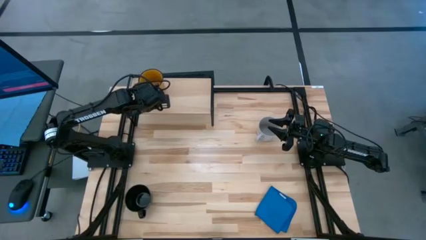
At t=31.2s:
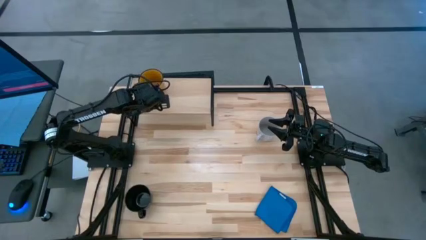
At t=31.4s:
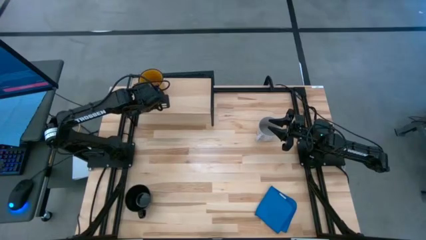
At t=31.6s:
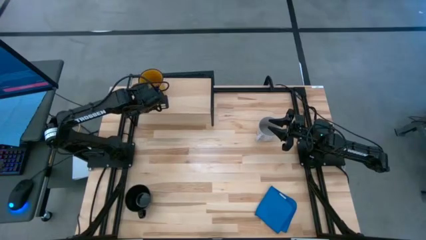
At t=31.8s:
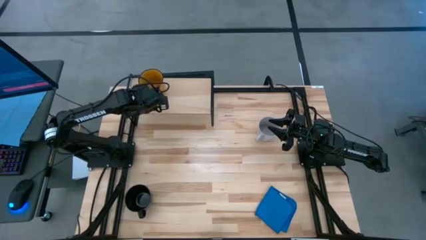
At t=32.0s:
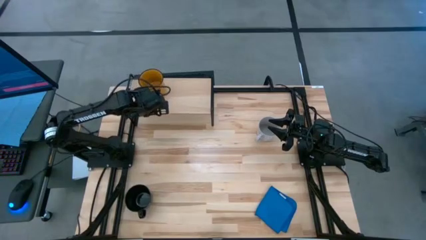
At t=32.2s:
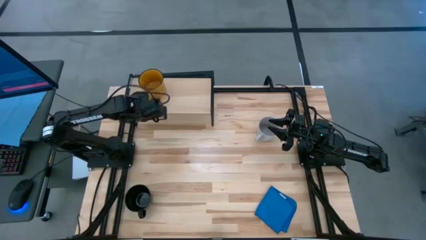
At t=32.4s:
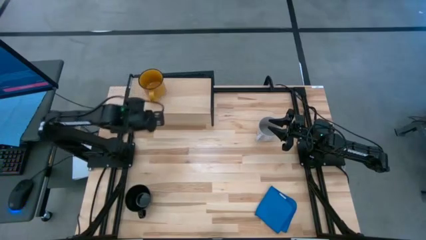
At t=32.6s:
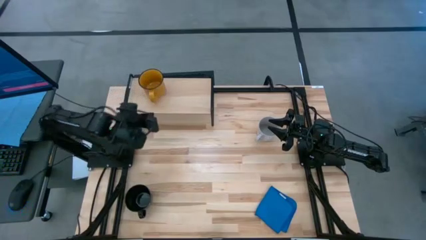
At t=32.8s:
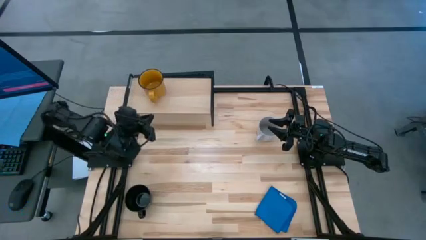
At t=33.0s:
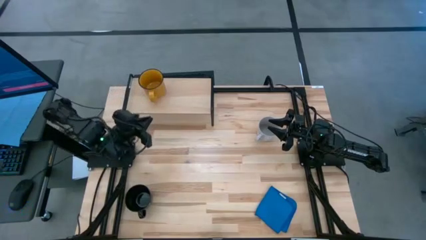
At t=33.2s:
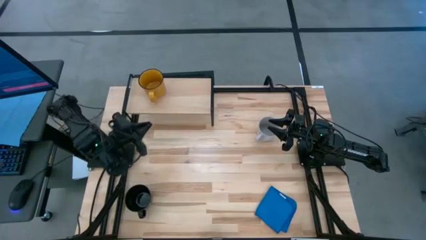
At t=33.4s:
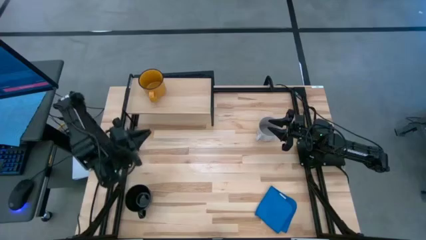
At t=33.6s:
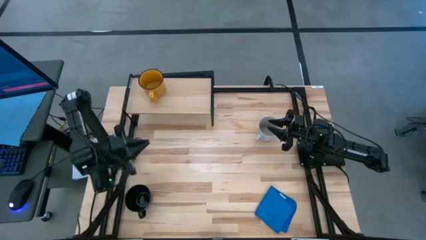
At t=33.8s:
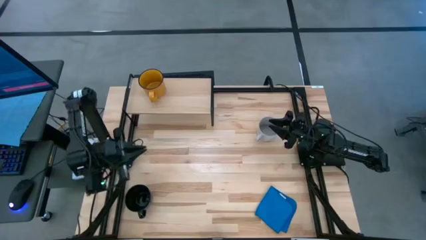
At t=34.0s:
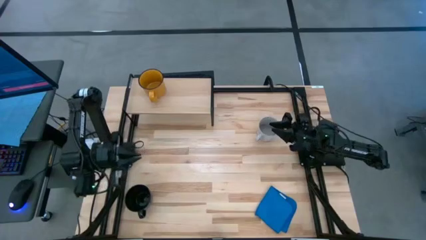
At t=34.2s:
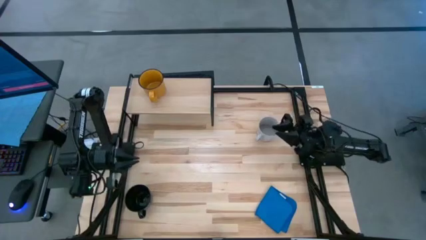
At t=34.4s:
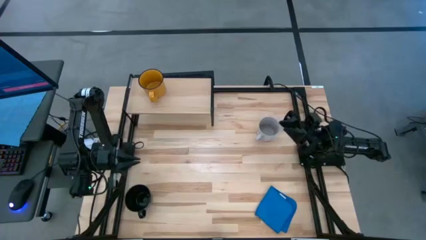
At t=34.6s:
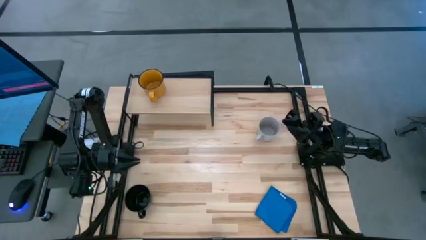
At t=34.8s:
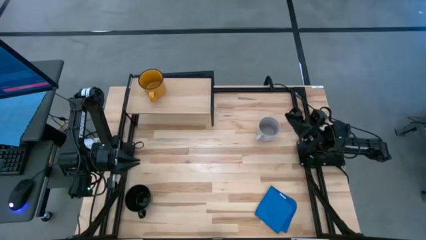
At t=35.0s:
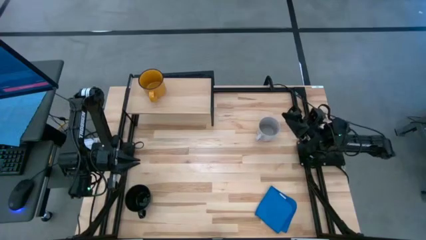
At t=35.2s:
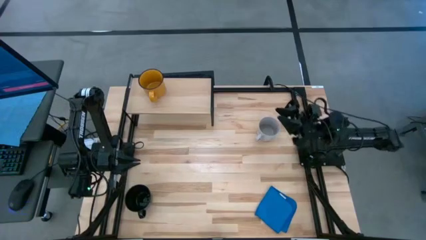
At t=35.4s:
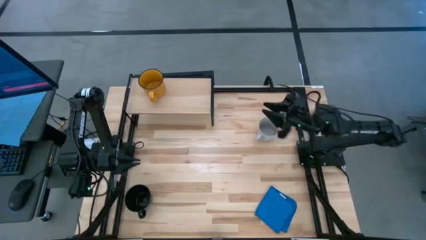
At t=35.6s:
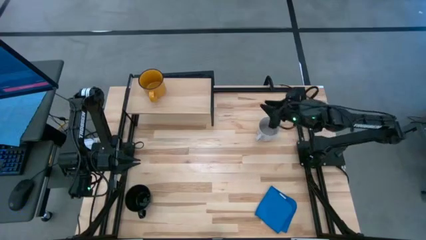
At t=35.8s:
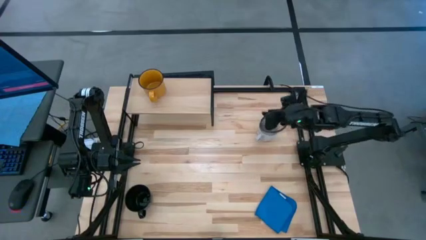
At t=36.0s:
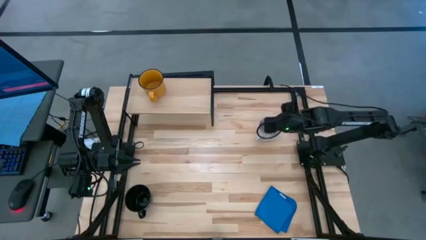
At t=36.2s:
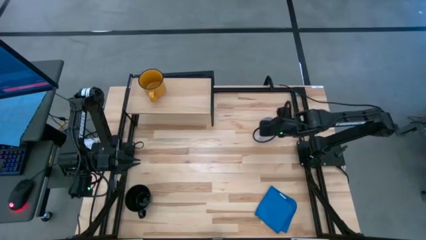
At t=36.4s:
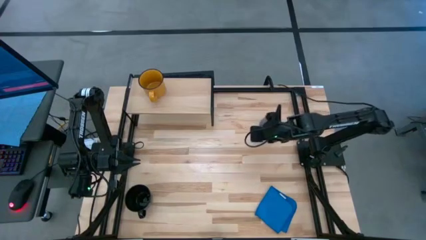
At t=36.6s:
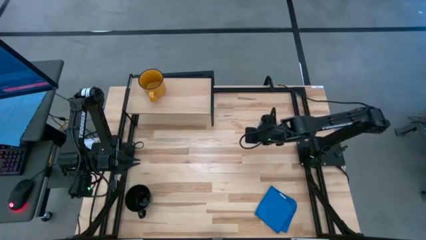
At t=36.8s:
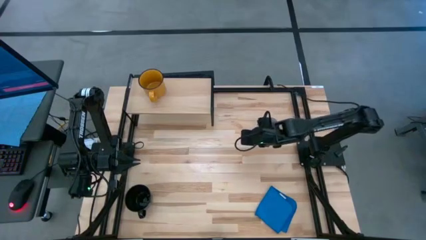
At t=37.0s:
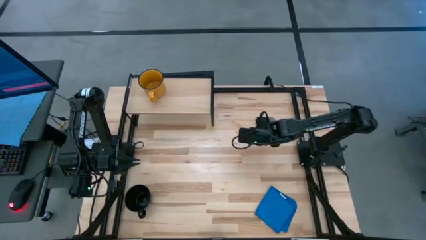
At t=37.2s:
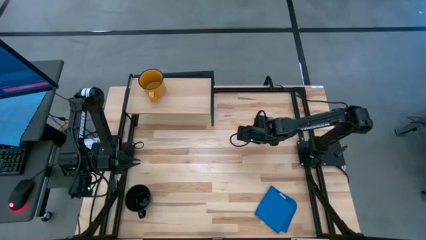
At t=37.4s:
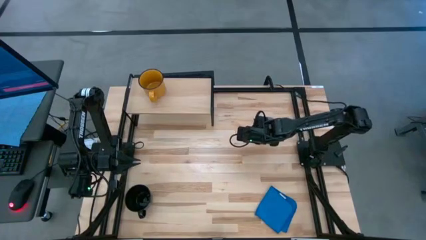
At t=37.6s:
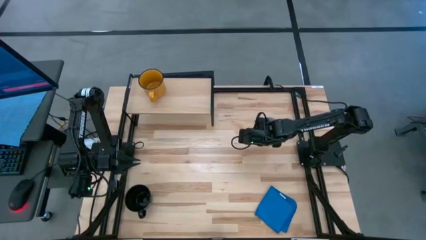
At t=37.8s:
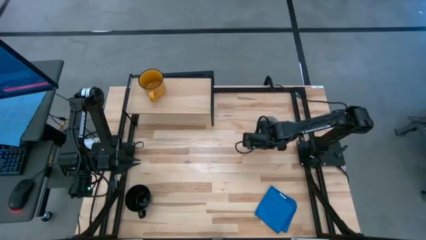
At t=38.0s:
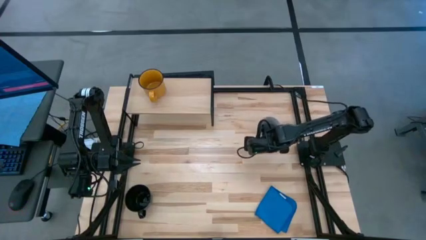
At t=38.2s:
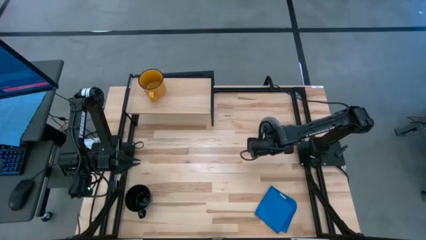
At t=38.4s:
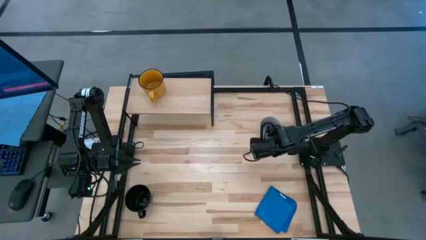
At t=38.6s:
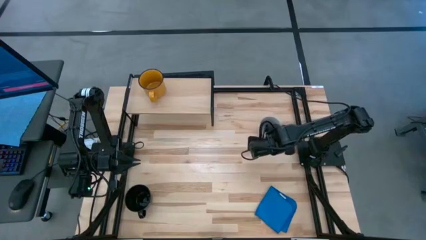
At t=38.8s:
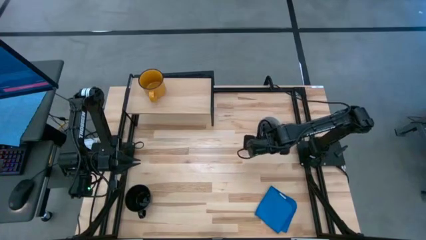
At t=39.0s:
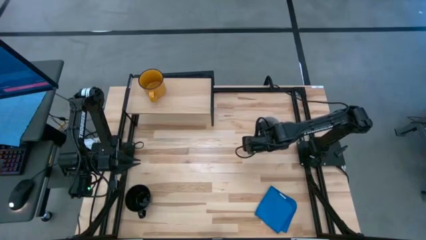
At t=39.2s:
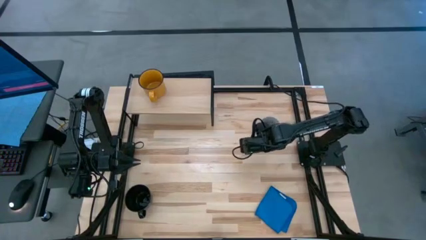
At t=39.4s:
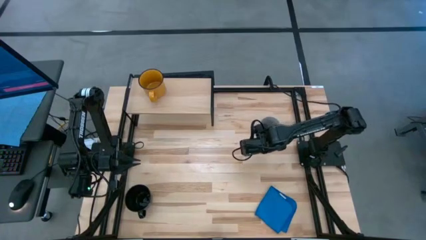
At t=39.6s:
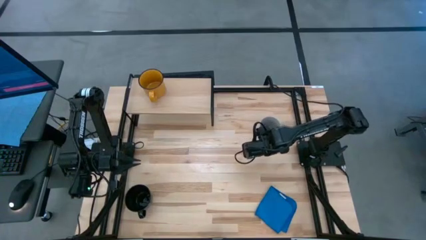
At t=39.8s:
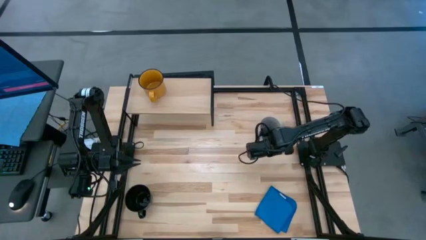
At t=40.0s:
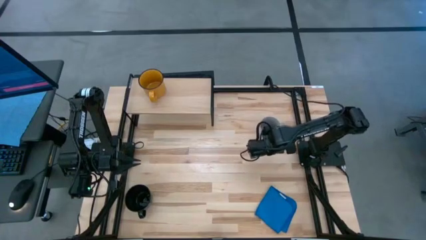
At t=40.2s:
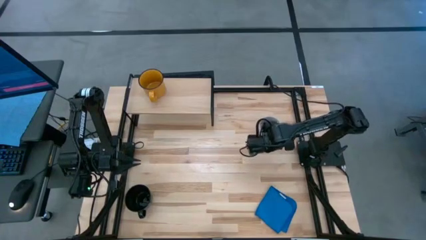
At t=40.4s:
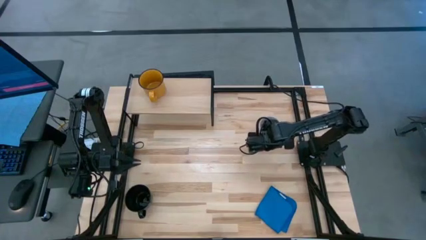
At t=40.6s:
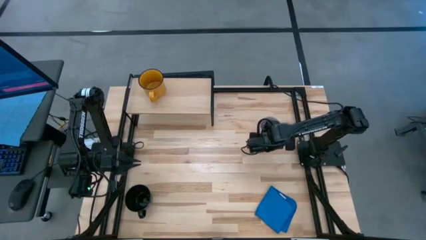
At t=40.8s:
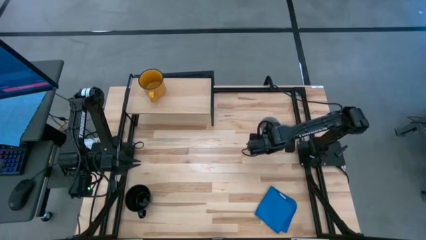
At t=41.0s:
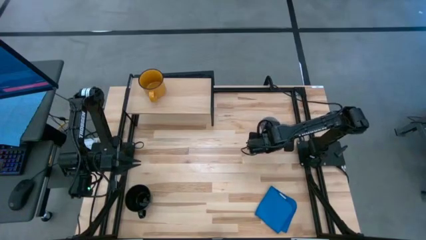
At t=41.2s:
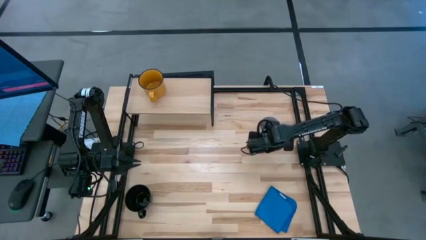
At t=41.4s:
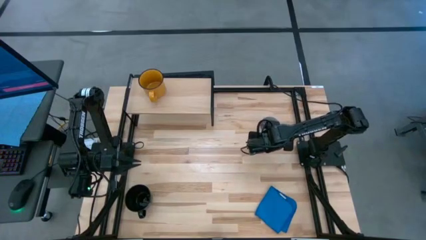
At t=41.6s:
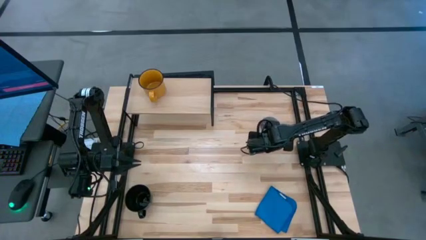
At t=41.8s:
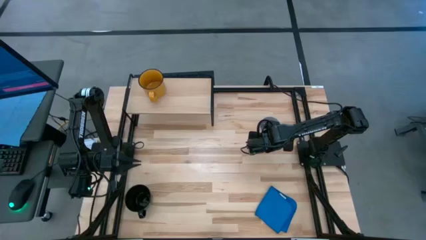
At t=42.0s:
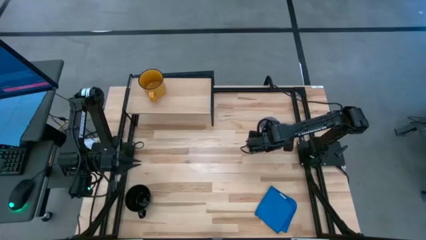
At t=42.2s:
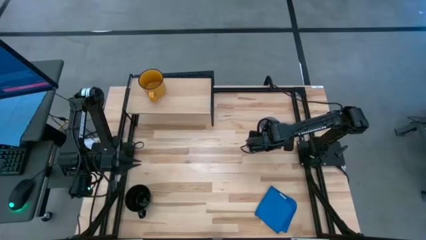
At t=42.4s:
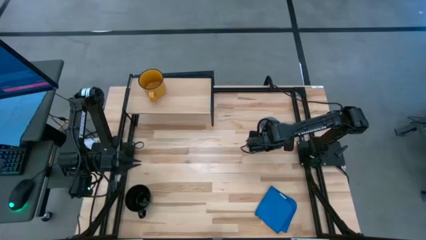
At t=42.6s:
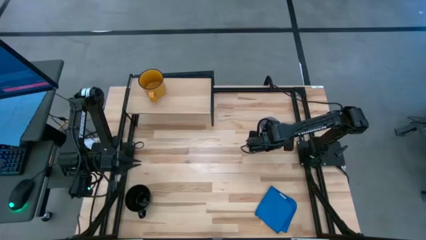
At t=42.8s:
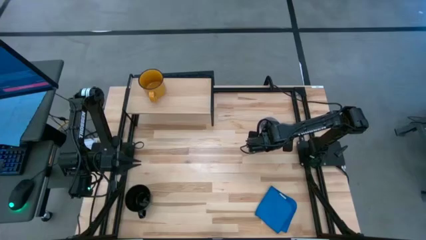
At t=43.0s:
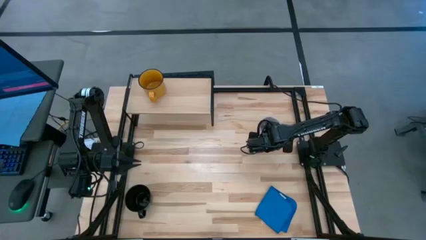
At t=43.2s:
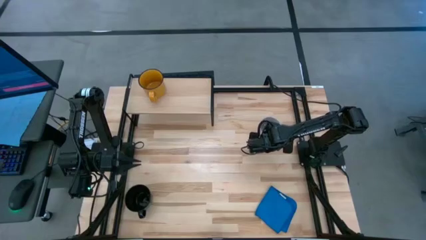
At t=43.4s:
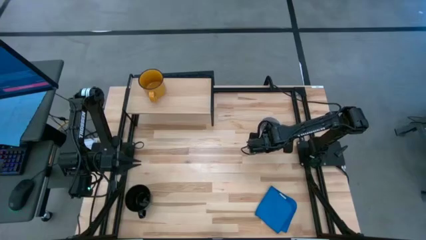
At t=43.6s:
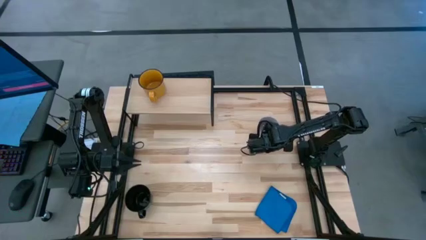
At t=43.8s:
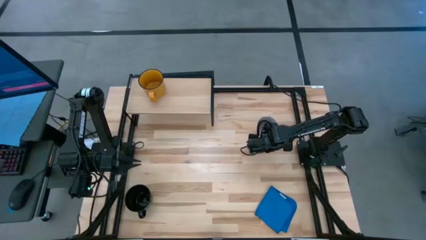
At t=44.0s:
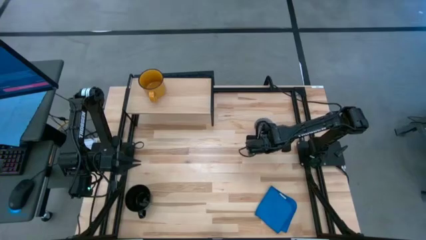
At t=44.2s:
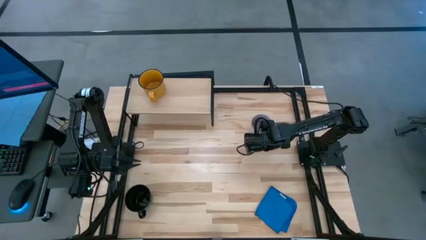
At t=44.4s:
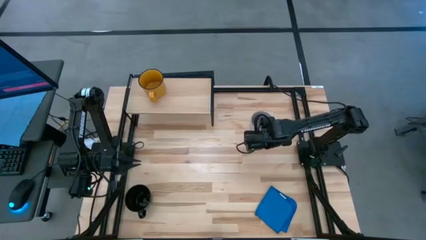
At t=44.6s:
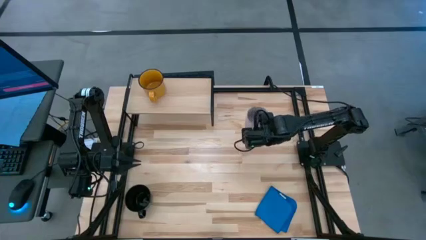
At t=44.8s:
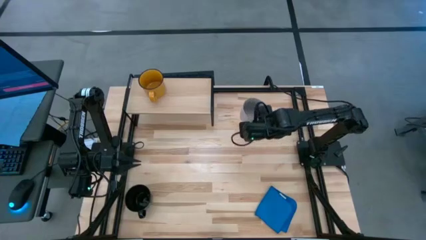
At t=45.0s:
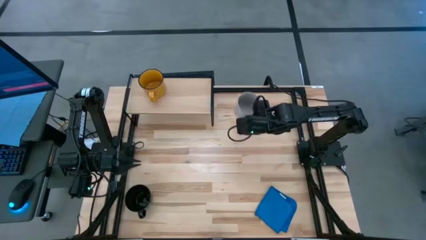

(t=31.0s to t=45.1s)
Task: Stack small to large cups/mugs on shelf
Put the gray mug on the shelf
